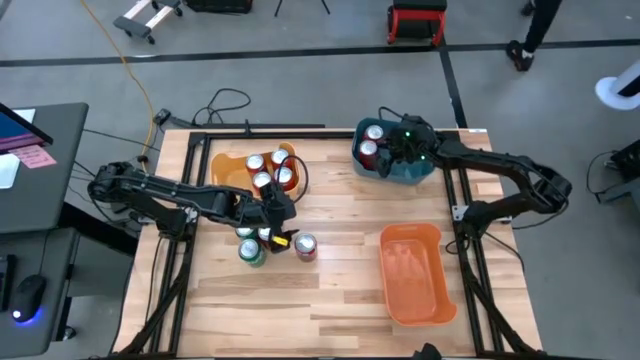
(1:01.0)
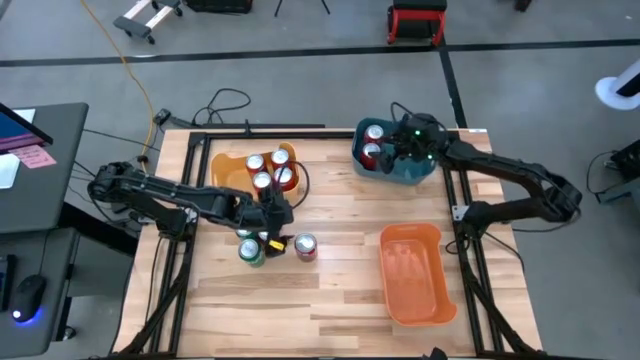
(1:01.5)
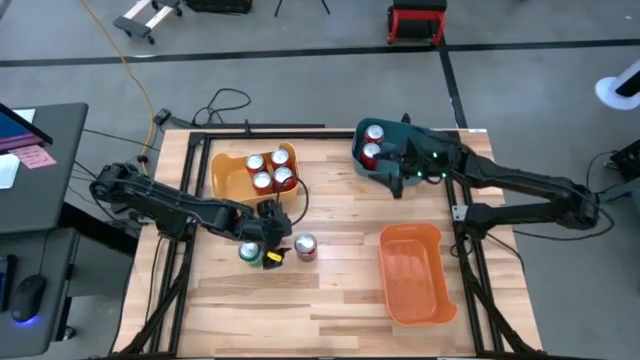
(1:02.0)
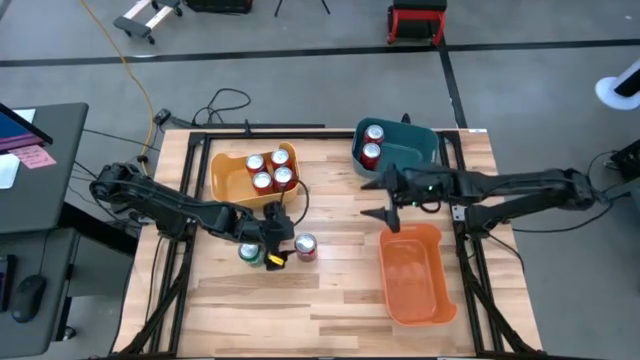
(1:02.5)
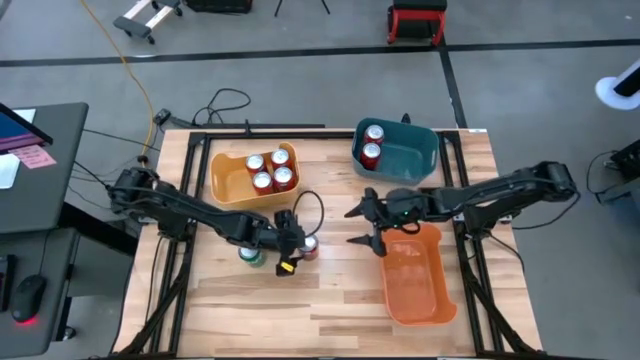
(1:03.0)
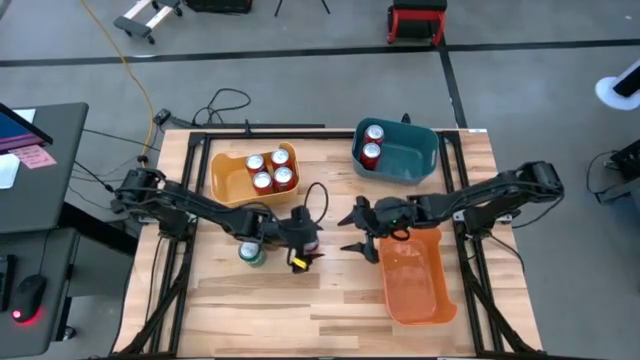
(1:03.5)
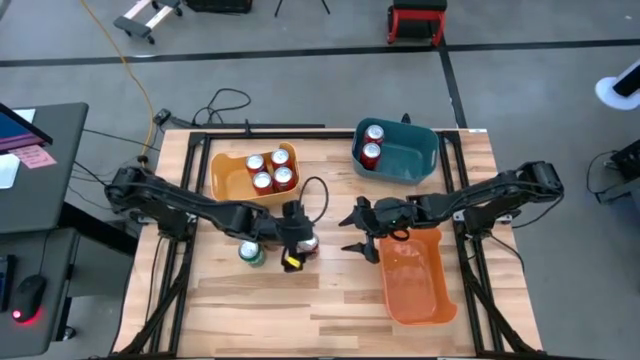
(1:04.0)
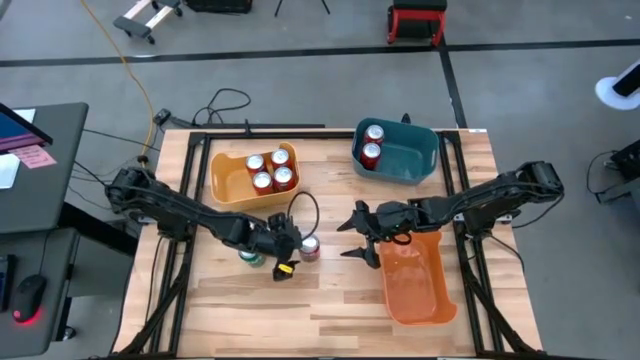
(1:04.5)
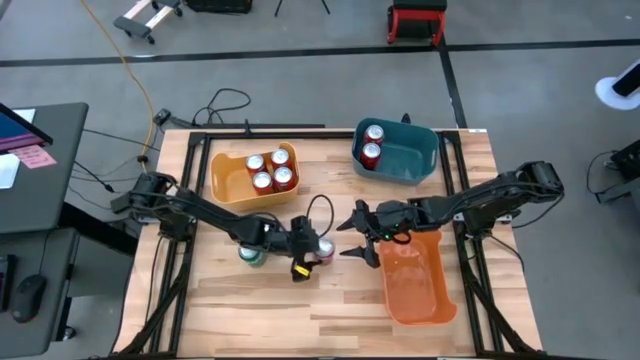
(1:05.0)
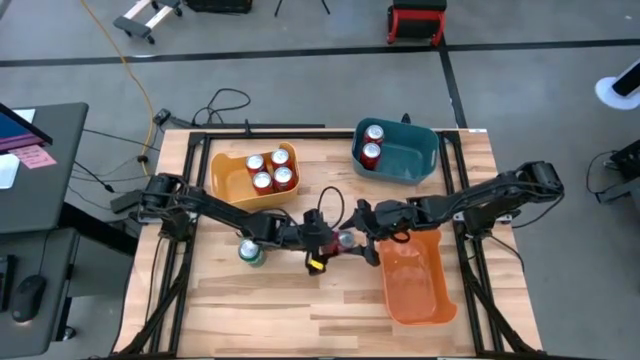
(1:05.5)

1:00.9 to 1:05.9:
Task: Sort soda cans
Put the right red soda can into the blue bin

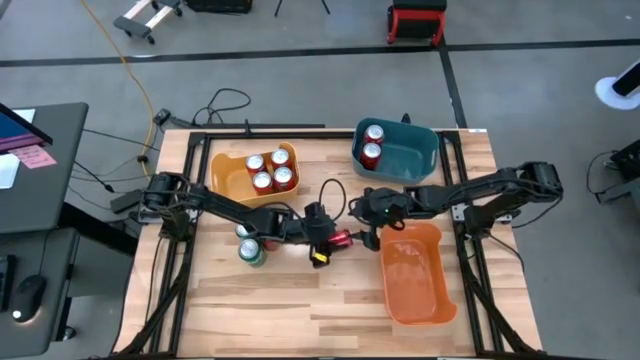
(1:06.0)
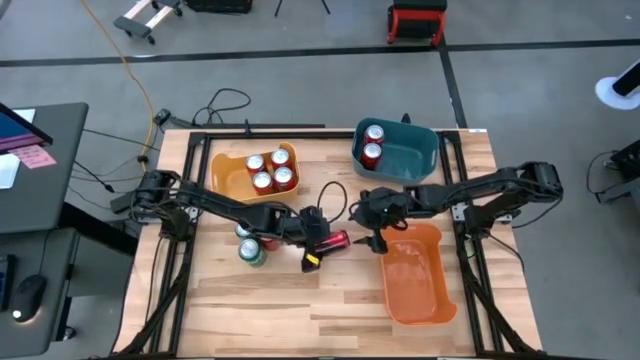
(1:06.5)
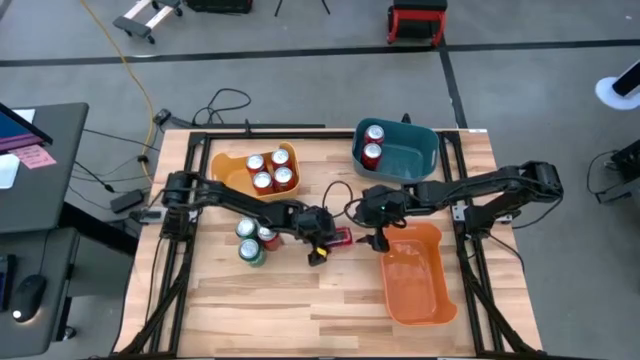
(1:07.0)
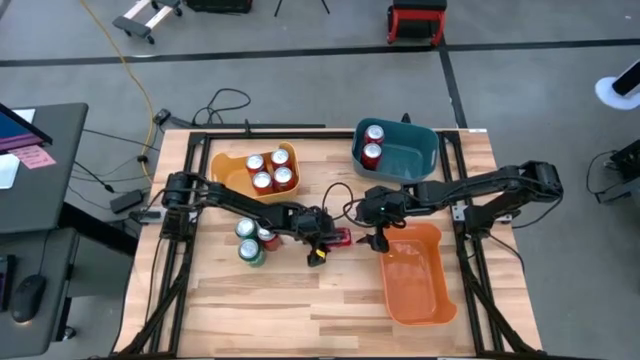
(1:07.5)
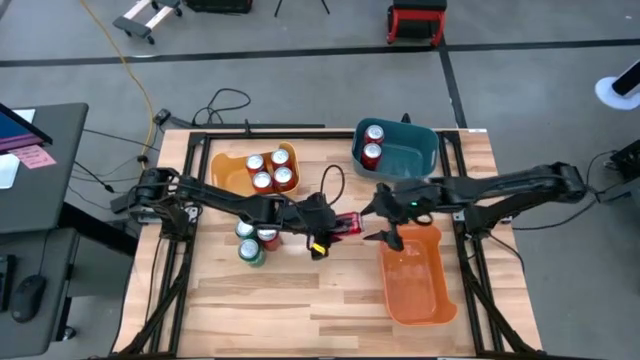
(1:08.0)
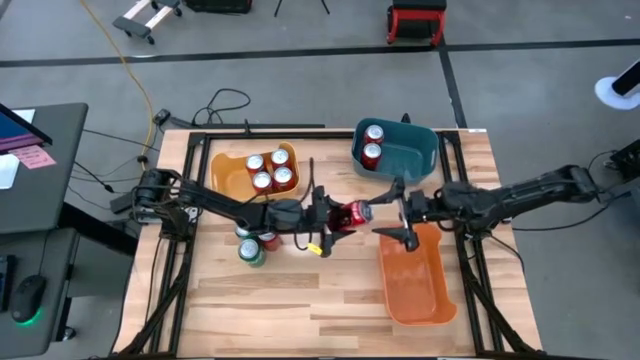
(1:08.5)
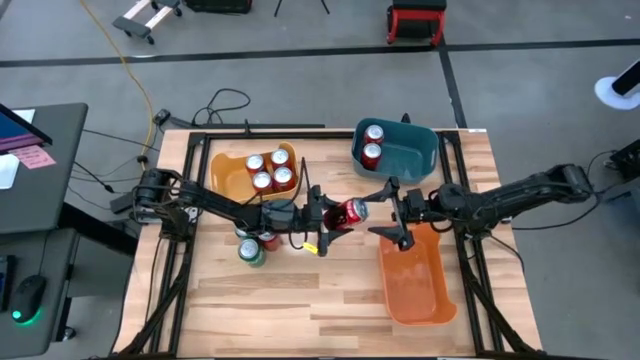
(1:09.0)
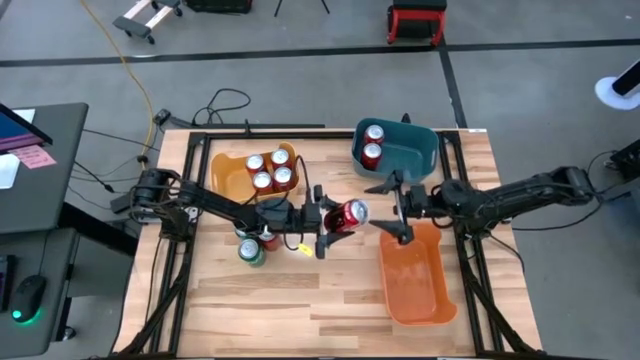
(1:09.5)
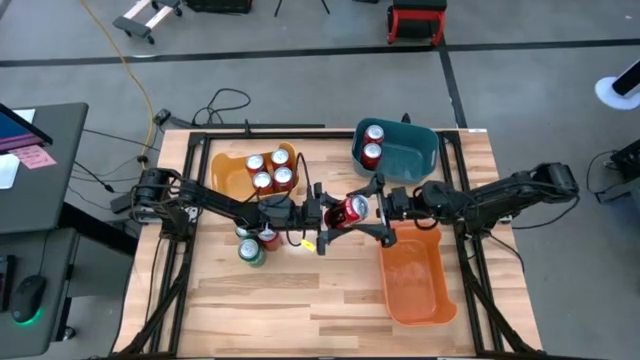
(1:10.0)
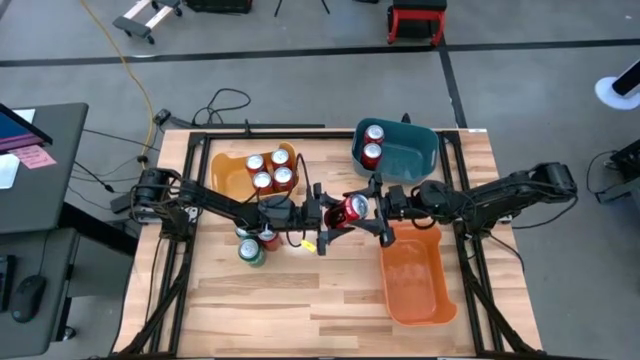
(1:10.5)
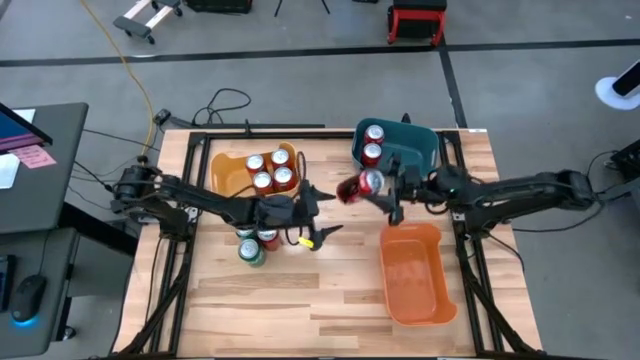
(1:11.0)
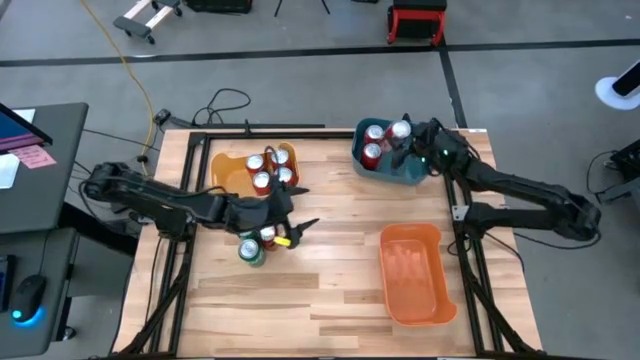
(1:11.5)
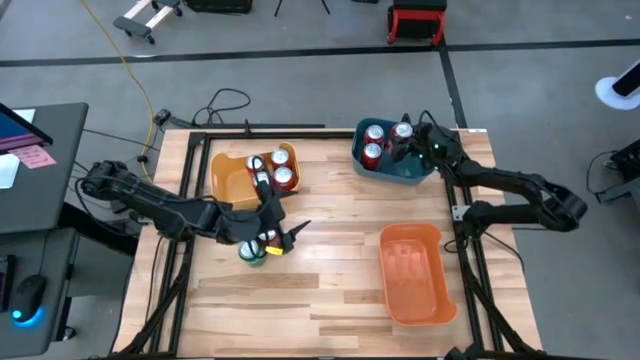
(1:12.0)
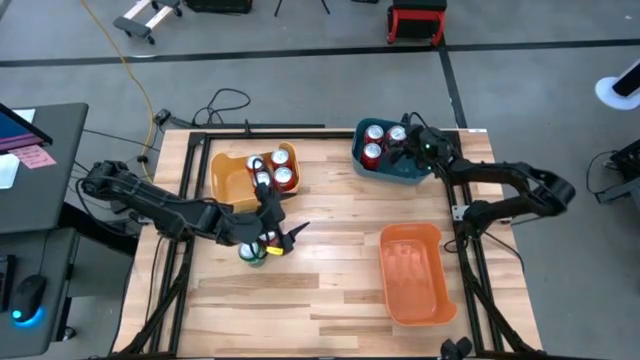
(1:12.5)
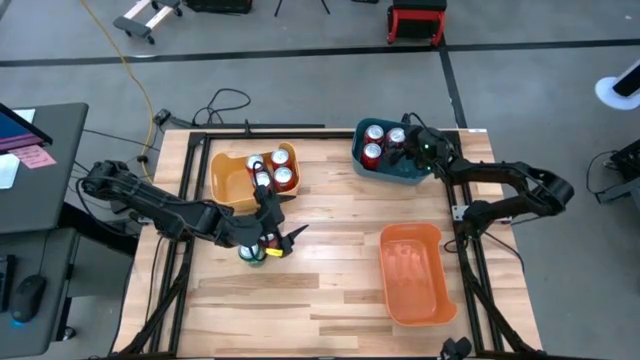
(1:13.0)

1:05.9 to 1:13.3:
Put the right red soda can into the blue bin

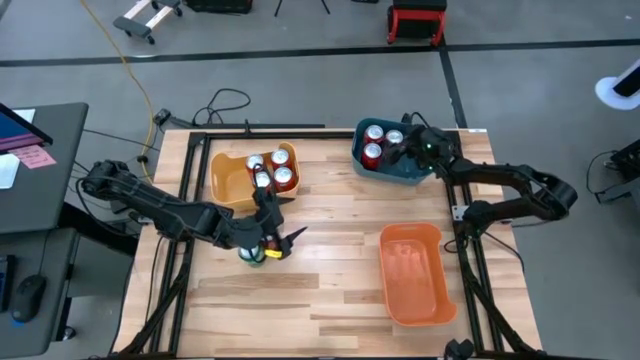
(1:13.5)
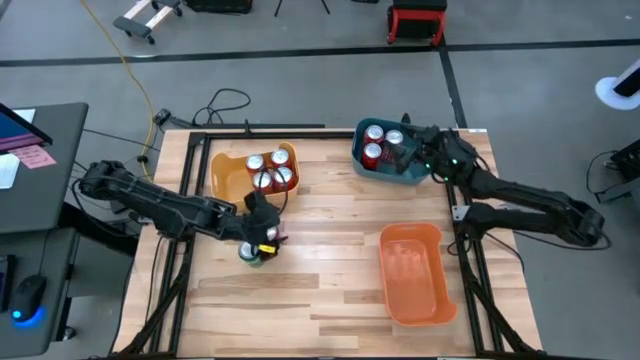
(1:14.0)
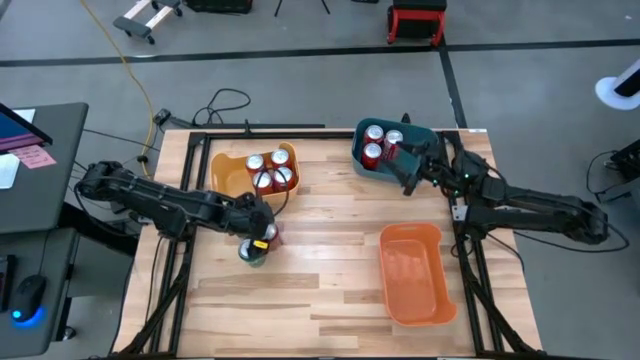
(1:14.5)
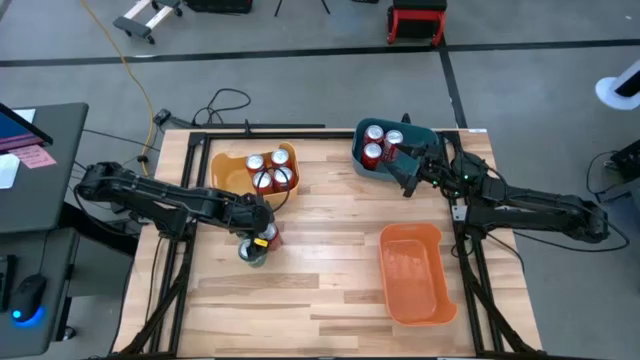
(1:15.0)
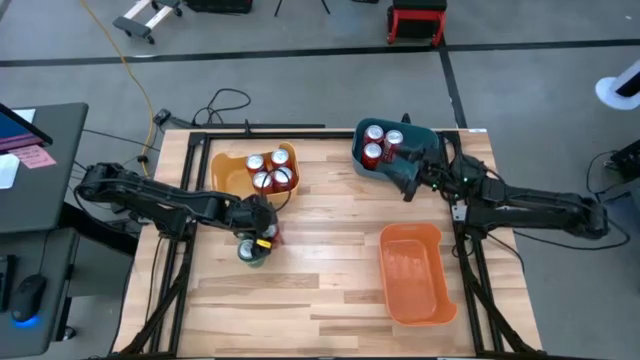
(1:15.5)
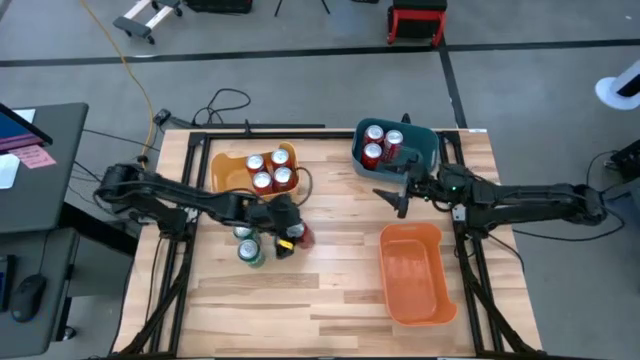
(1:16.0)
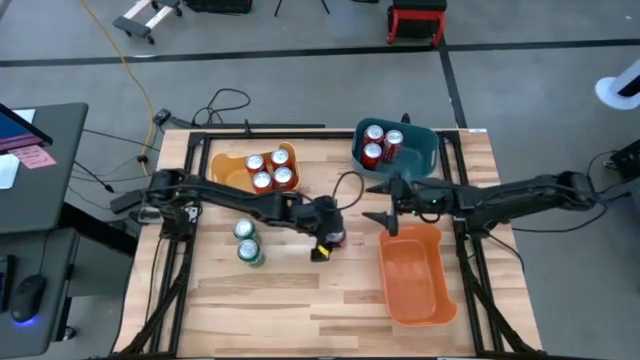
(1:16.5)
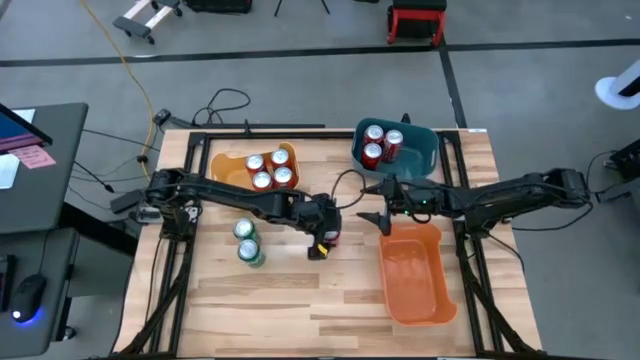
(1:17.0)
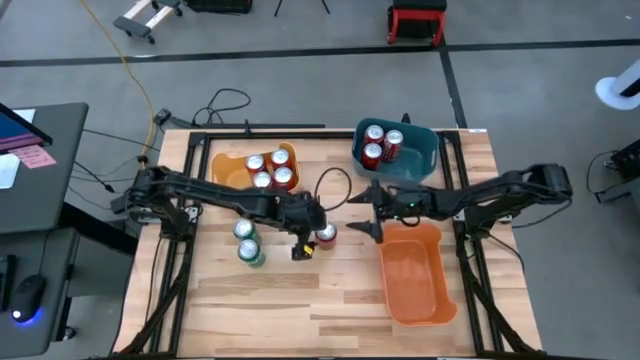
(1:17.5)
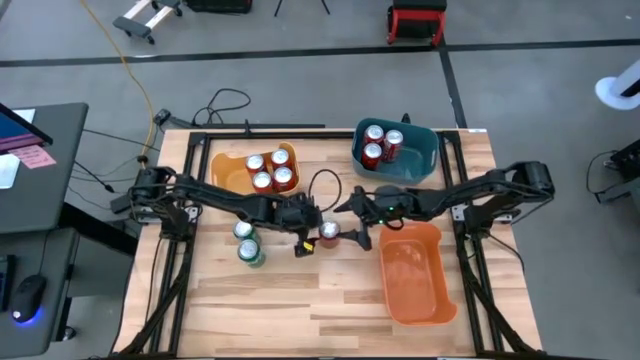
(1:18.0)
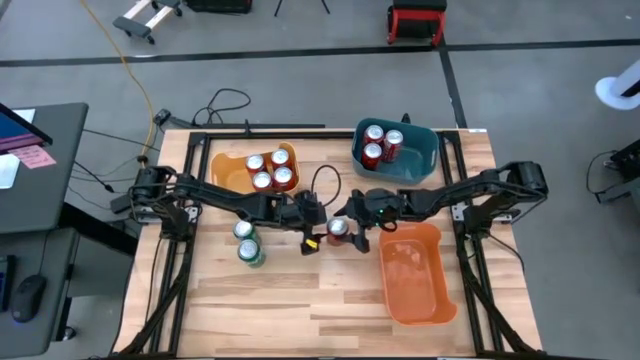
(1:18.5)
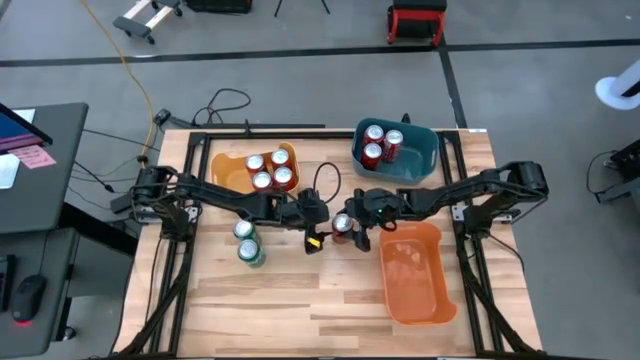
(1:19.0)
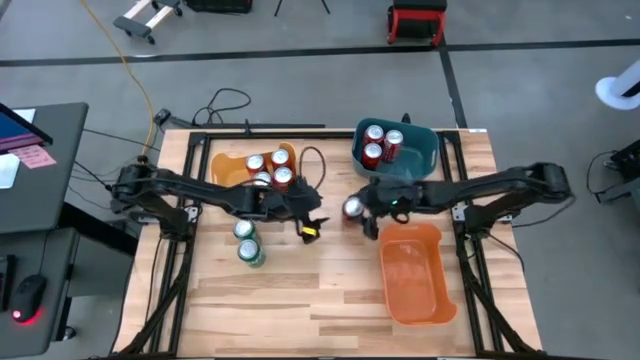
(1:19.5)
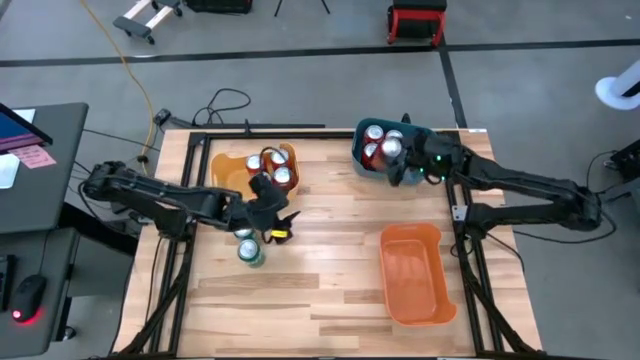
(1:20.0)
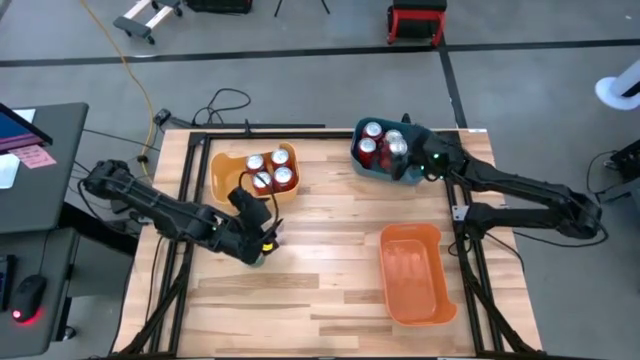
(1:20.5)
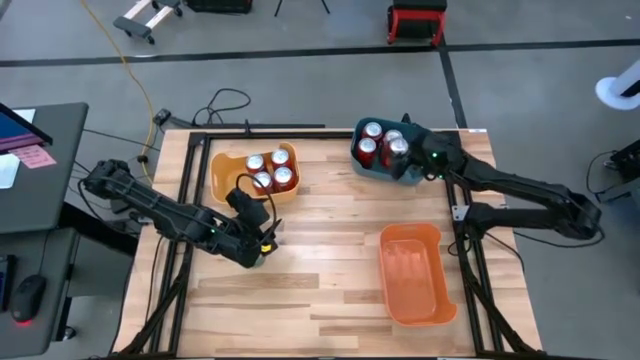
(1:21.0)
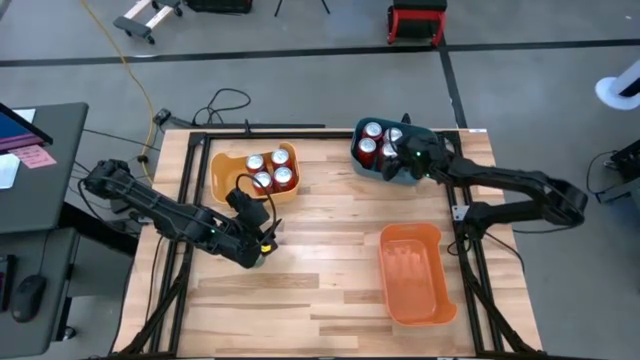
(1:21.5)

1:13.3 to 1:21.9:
Put the red soda can into the blue bin

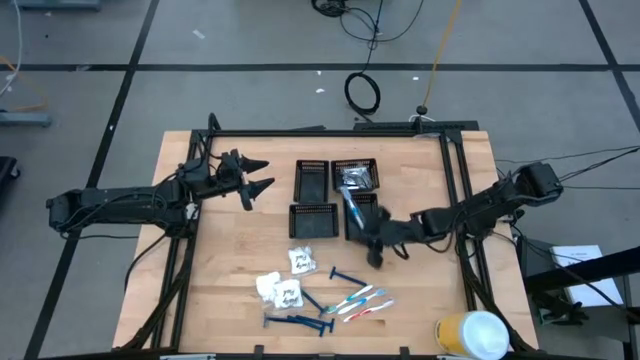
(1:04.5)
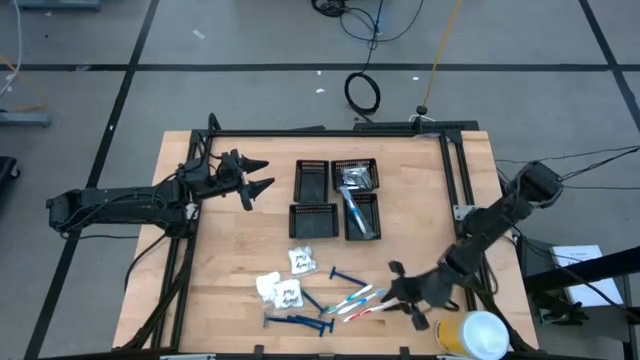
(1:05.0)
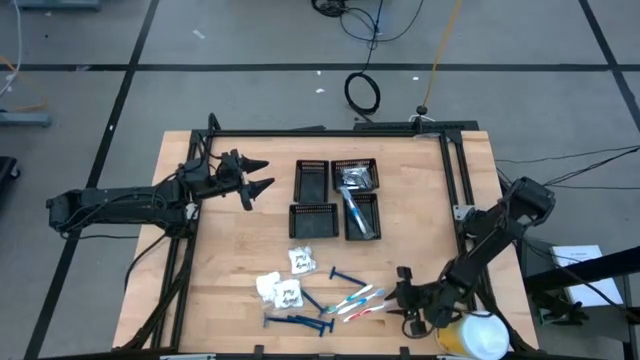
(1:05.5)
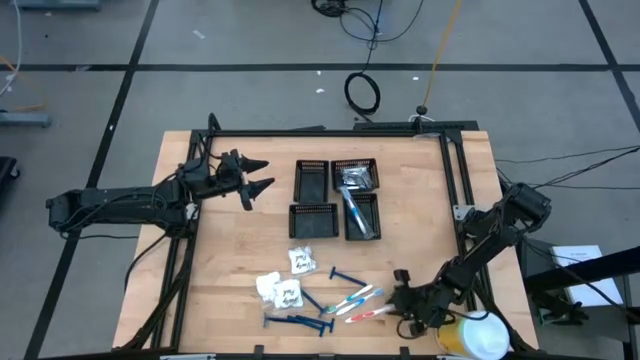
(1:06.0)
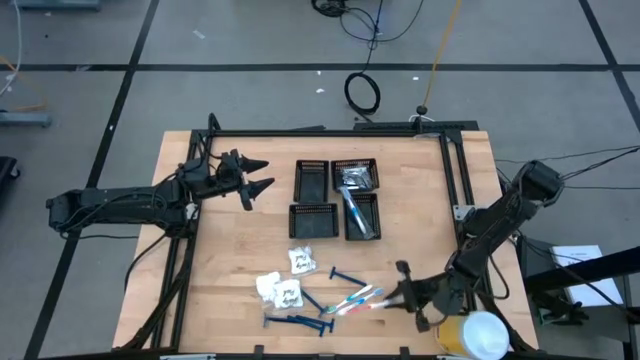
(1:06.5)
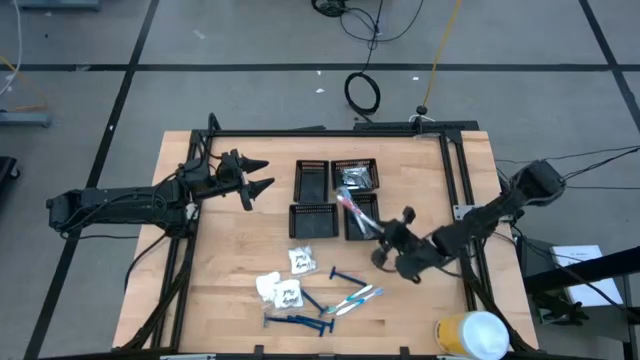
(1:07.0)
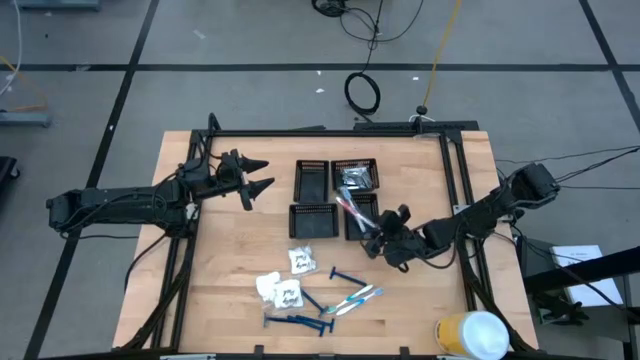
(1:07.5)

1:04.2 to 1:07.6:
Task: Pick & Place Travel size toiletries
Put the red toothbrush into the bottom right black bin
